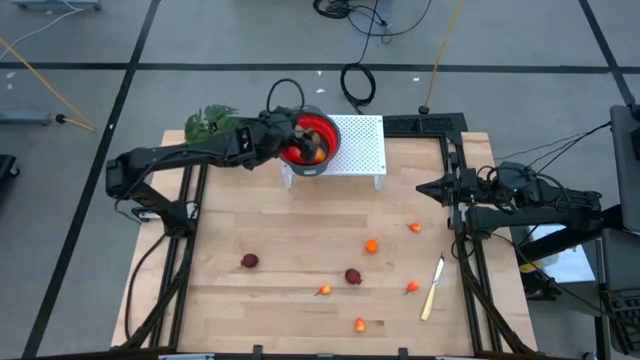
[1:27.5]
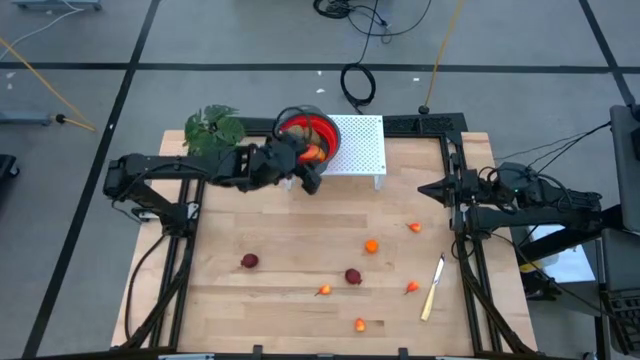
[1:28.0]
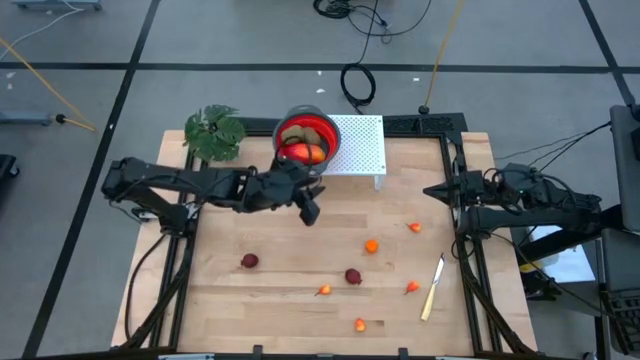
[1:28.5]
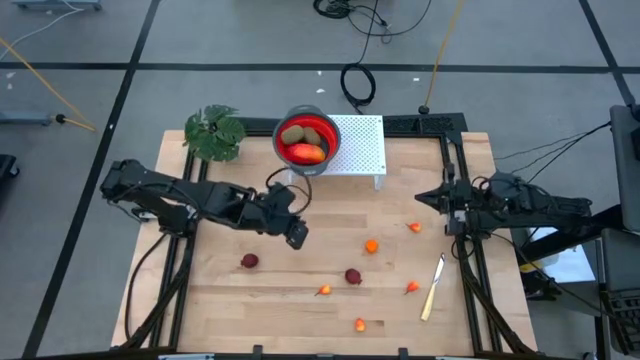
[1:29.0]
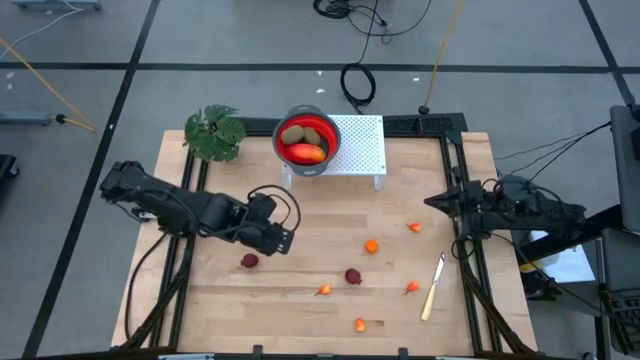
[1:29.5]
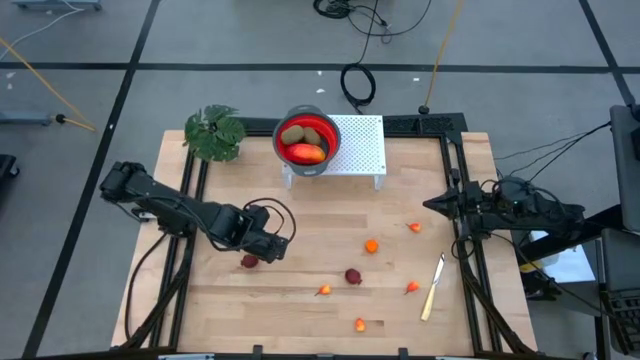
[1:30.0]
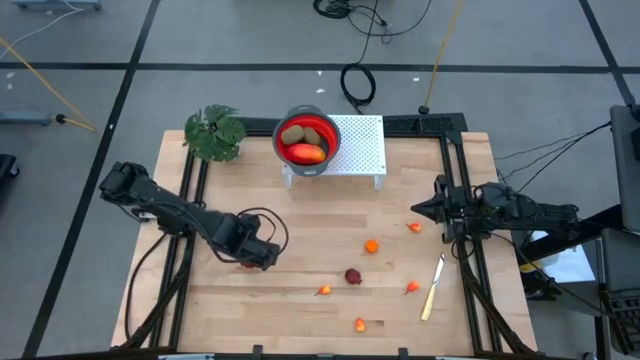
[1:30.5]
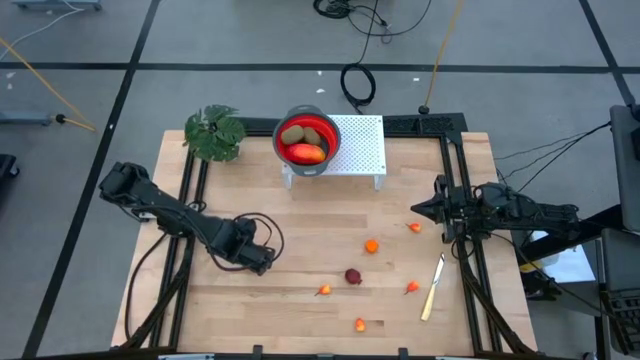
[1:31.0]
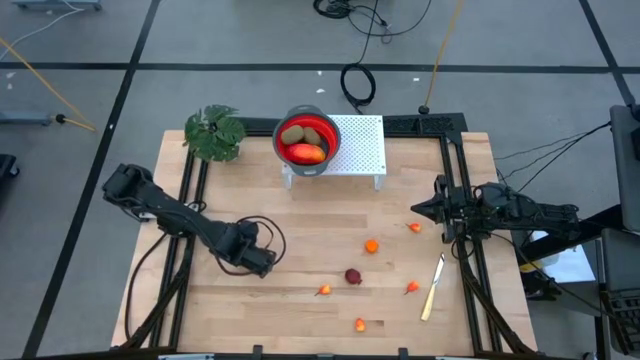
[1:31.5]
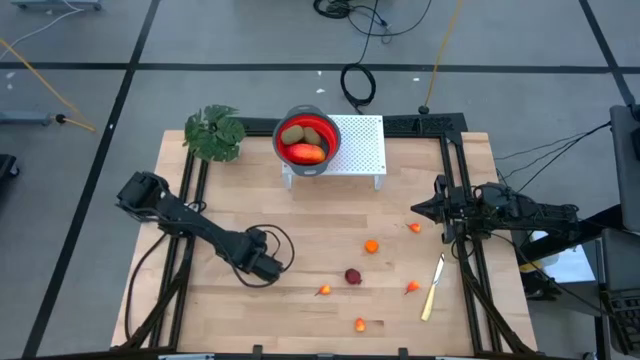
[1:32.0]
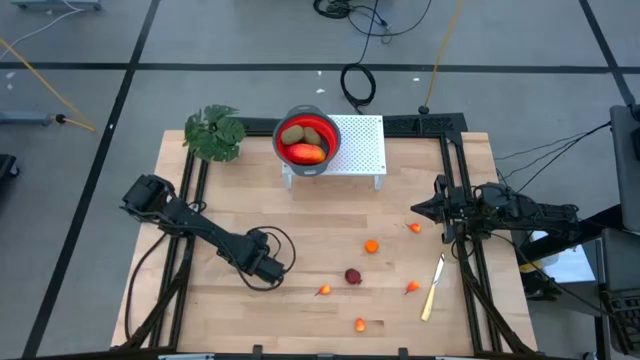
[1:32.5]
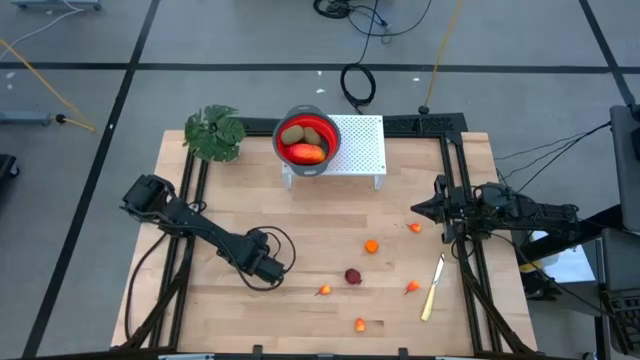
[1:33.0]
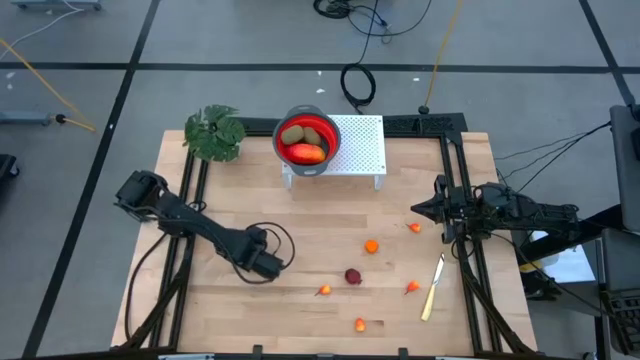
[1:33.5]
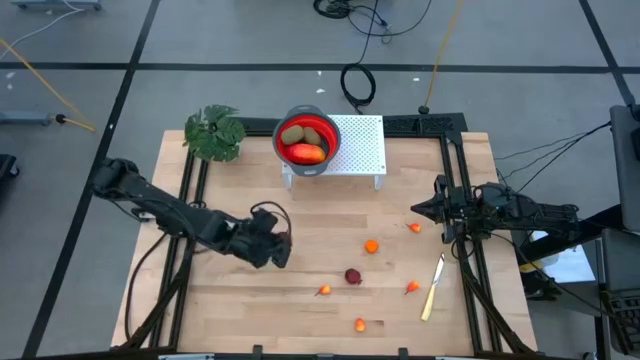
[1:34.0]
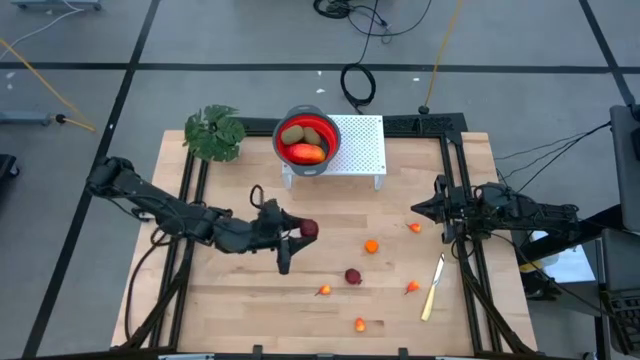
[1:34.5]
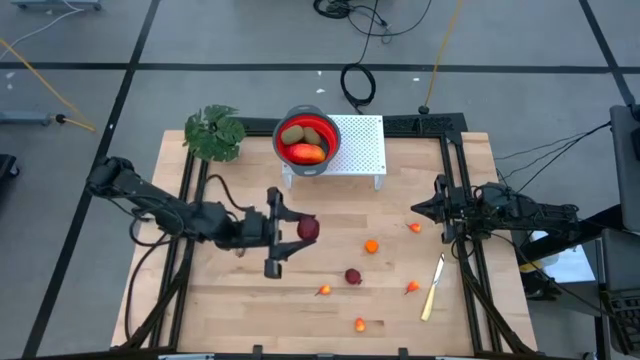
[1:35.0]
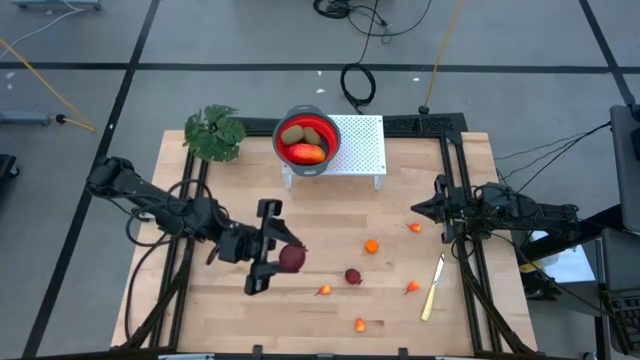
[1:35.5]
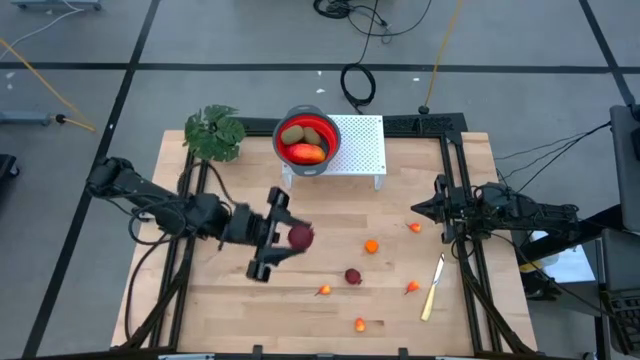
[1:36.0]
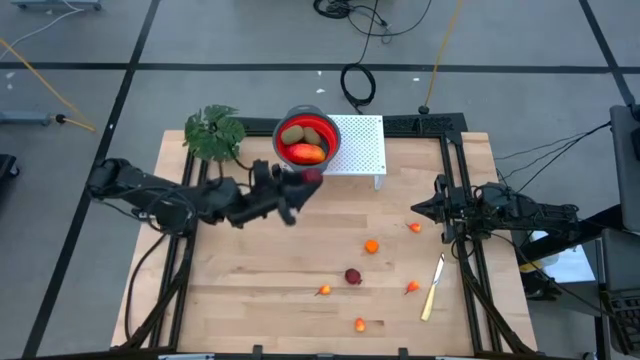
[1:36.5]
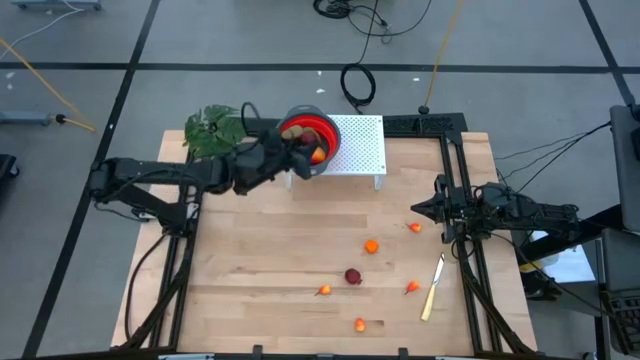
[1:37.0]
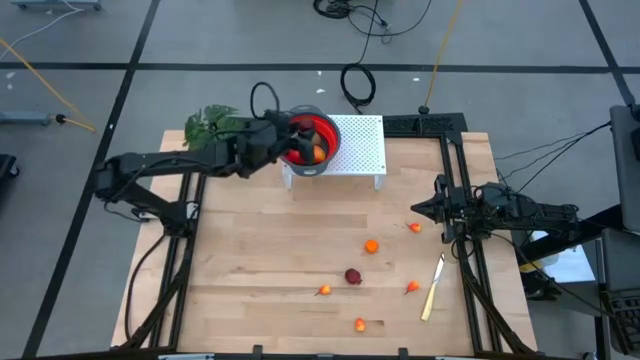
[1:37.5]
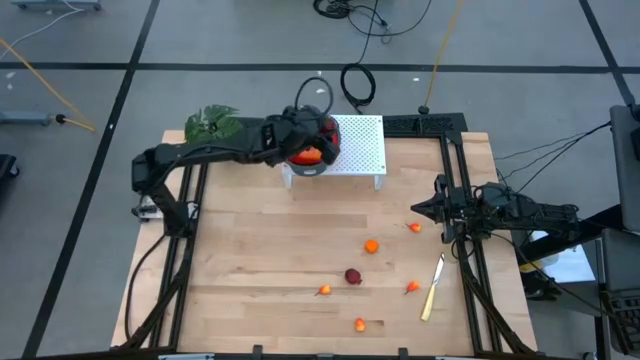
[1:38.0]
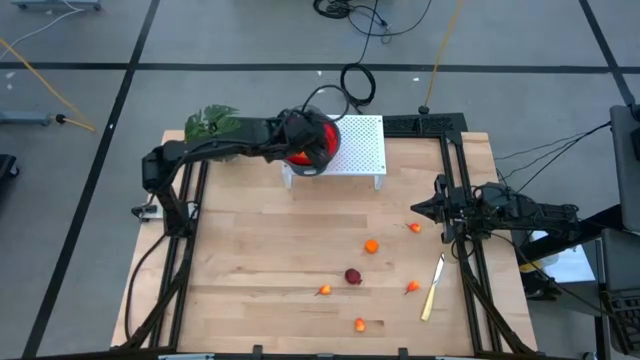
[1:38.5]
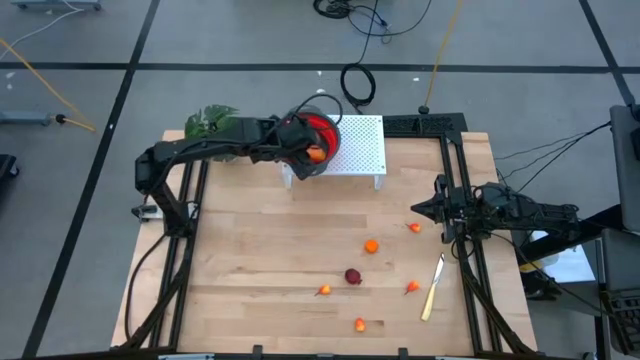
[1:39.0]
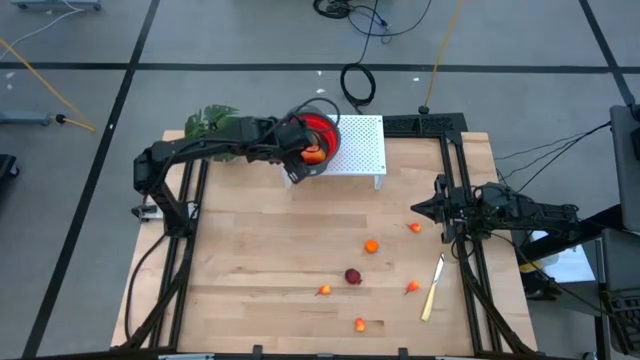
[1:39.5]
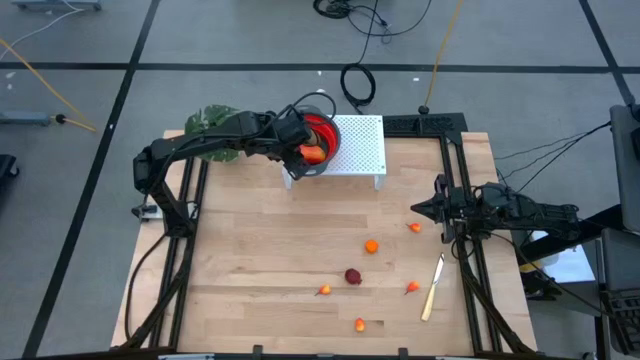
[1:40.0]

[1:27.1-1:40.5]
Task: Pick & Place Fruit
Put the left pomegranate into the red strainer bowl

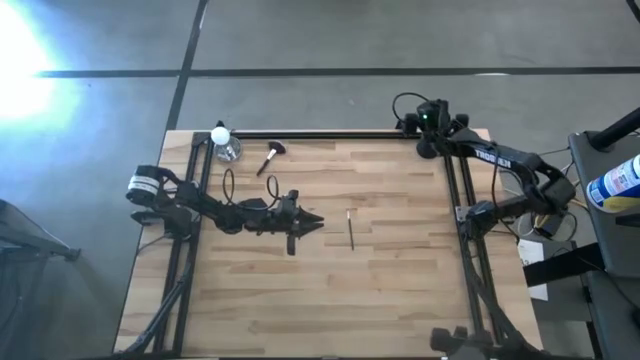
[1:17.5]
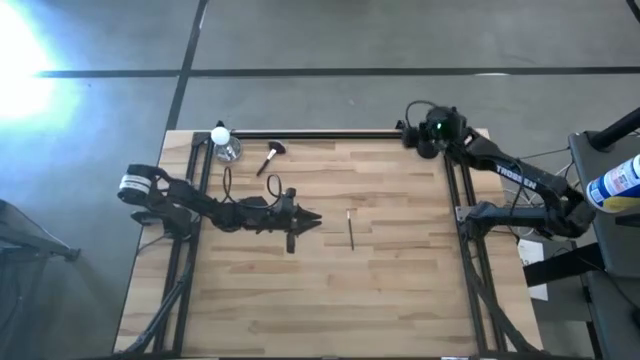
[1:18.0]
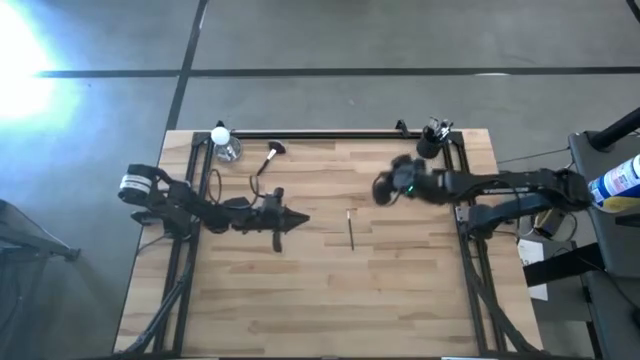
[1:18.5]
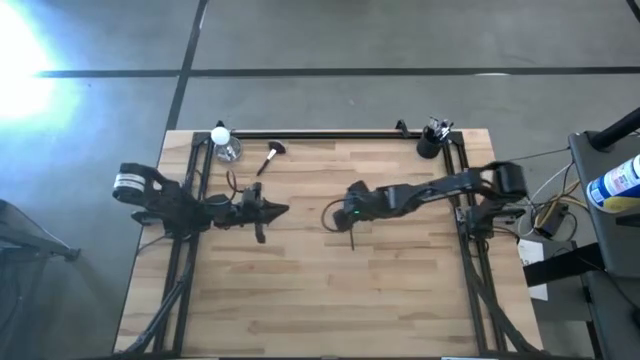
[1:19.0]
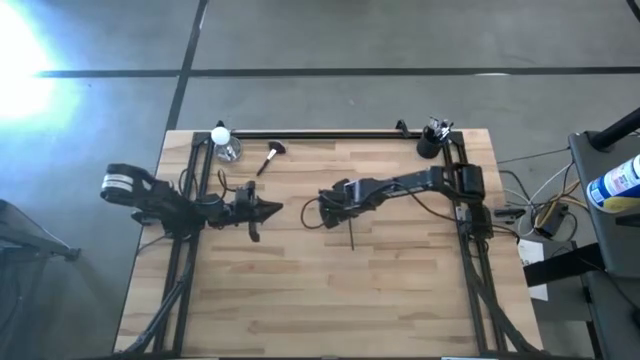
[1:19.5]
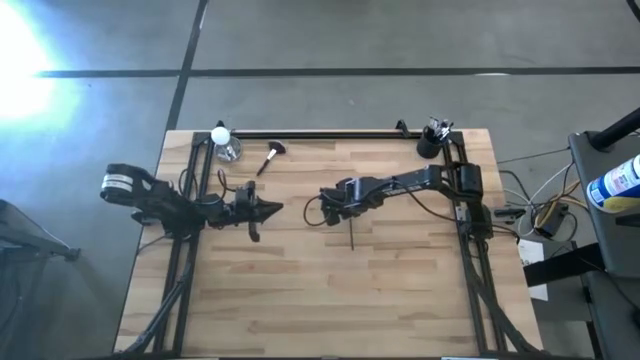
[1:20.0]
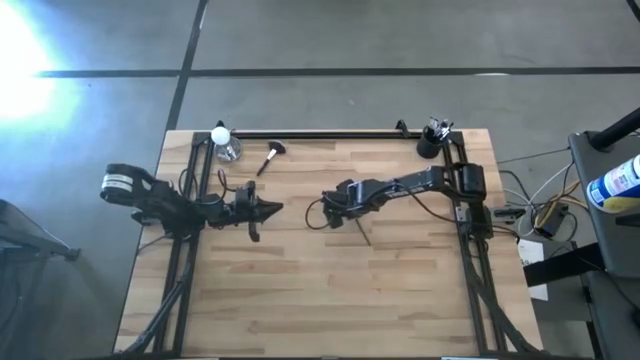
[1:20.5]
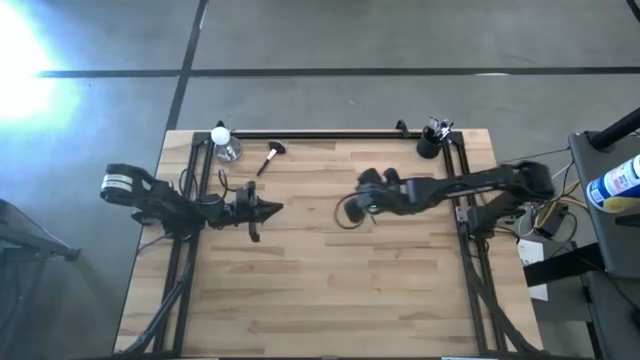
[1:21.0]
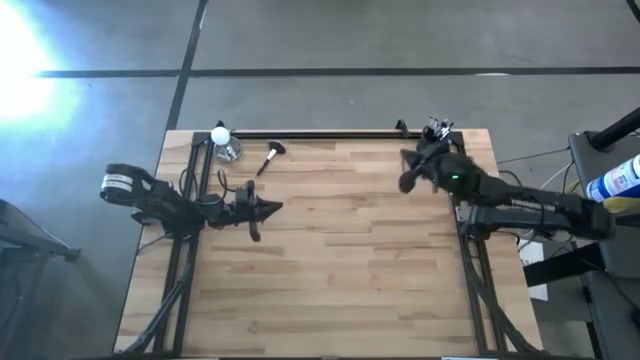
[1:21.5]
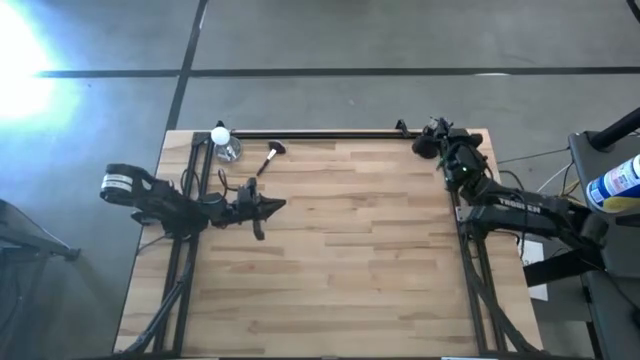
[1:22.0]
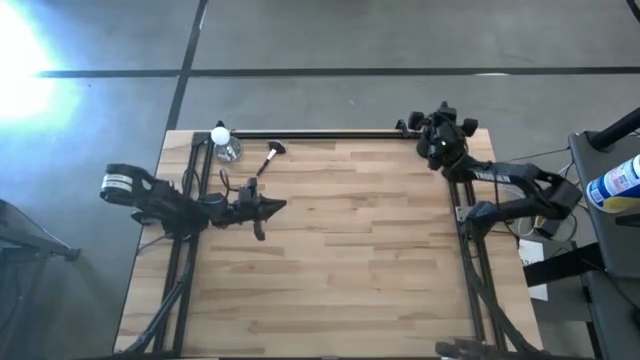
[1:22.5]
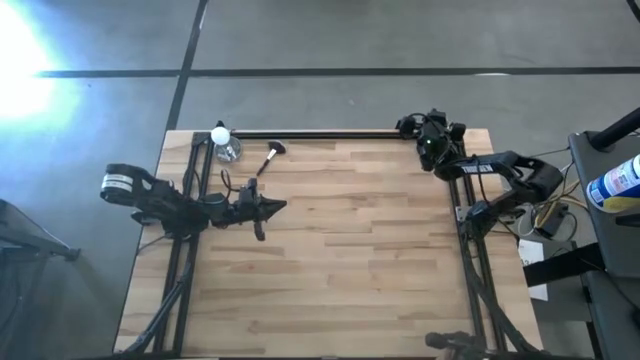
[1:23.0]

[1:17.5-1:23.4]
Task: Put items in baskets/containers
Put the foundation brush into the mesh organizer

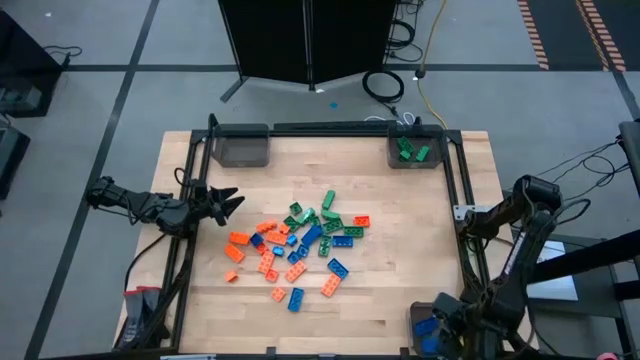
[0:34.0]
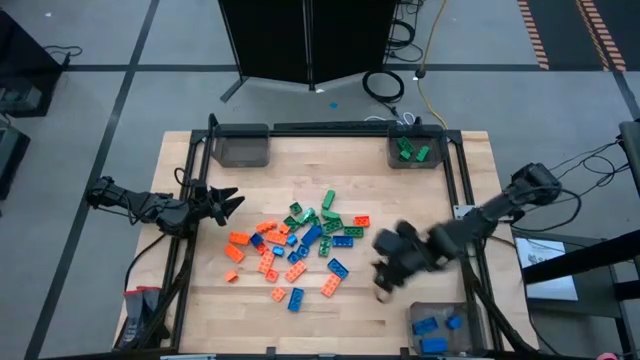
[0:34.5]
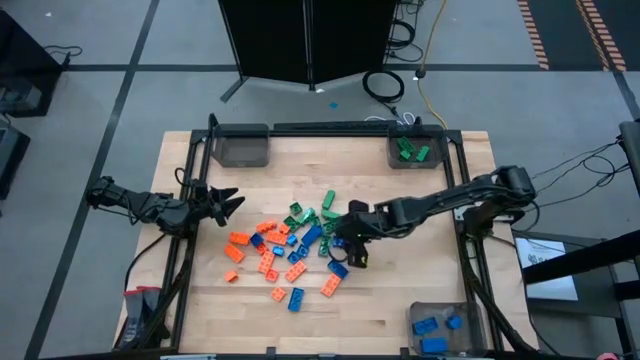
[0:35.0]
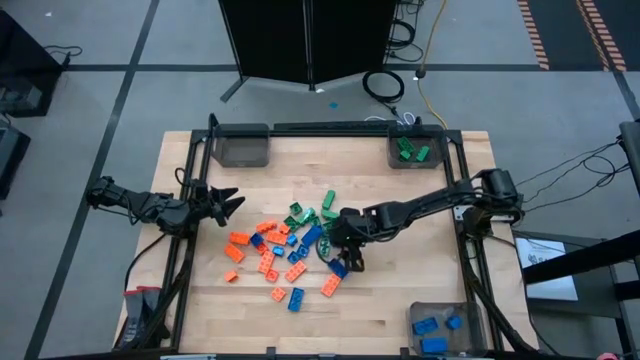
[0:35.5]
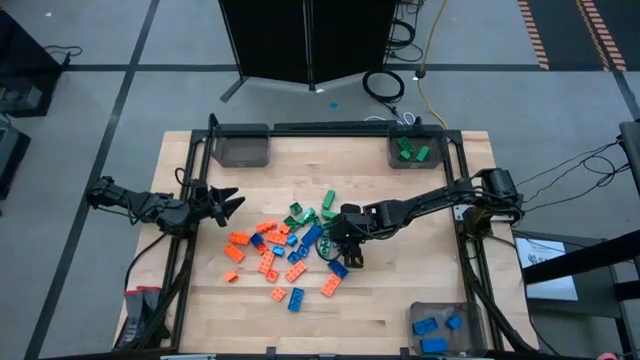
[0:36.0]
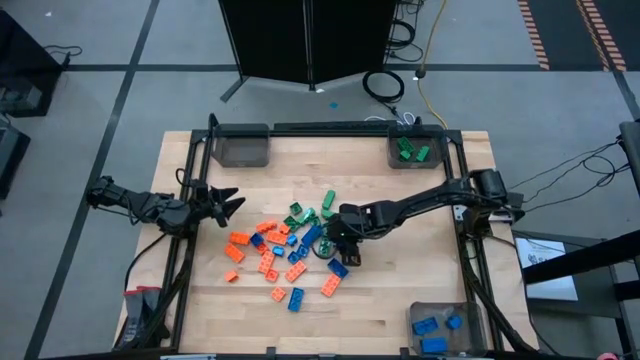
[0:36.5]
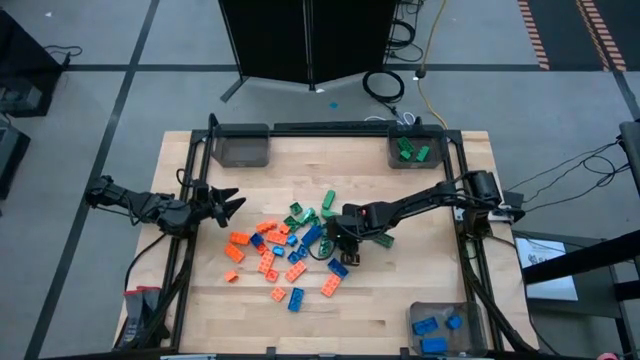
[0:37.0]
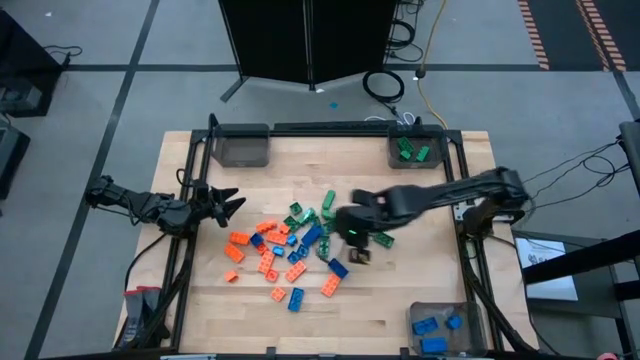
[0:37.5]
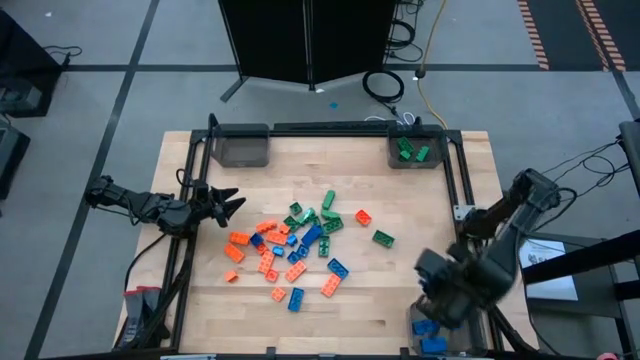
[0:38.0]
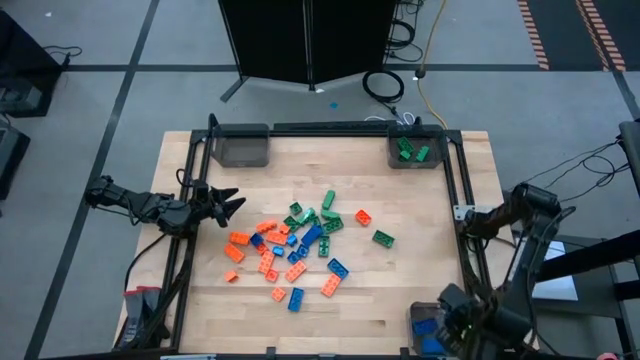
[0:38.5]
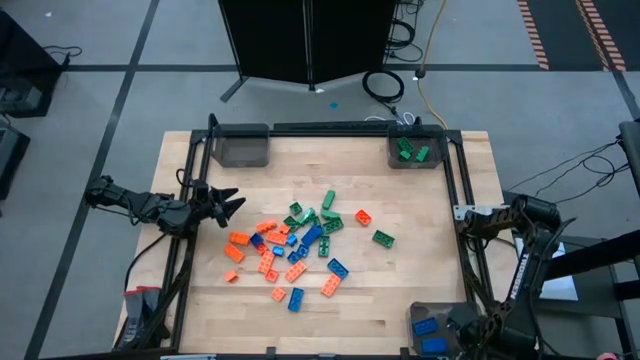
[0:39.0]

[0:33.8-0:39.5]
Task: Sort blocks
Put the blue game piece into the bottom black bin
